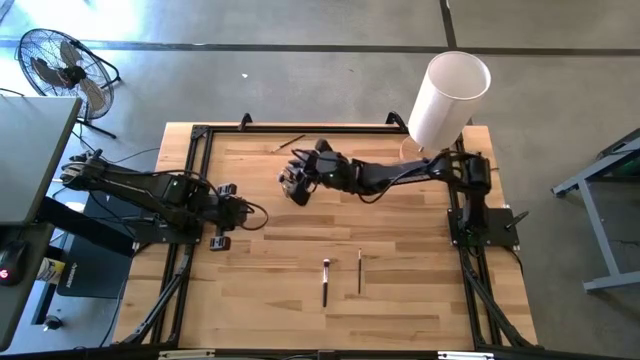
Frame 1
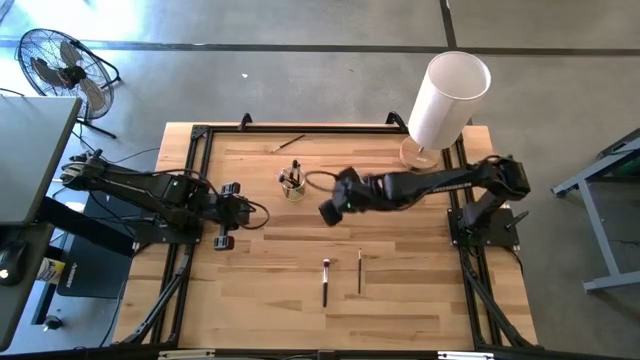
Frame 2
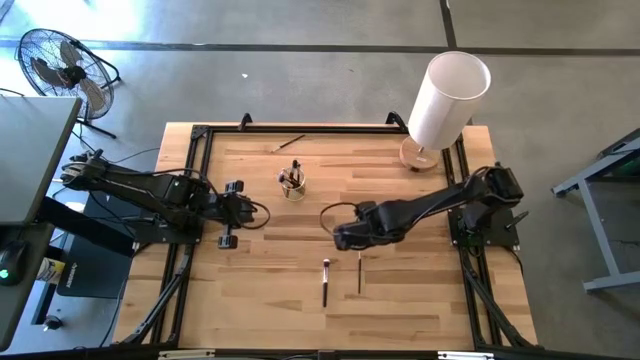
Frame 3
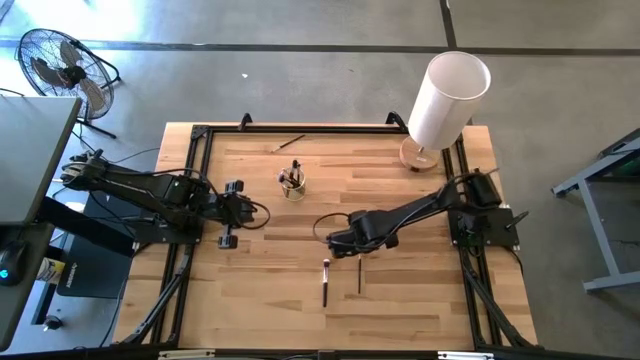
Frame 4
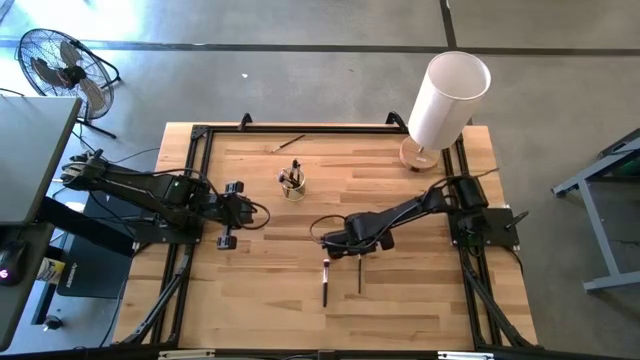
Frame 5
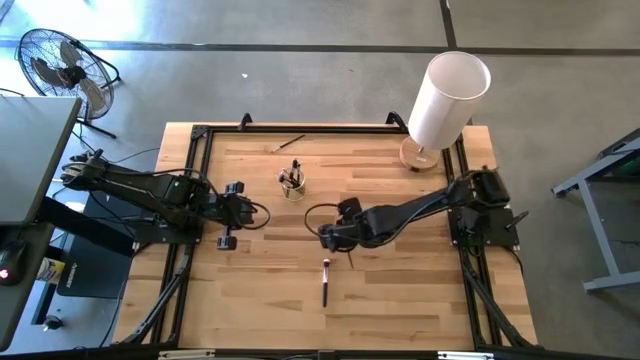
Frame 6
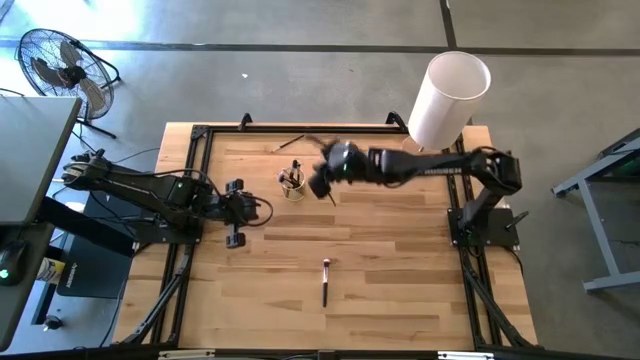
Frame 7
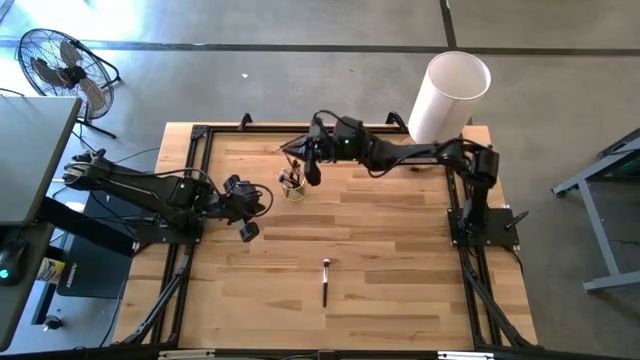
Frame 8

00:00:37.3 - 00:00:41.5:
Task: Put items in baskets/containers
Put the makeup brush into the wire organizer

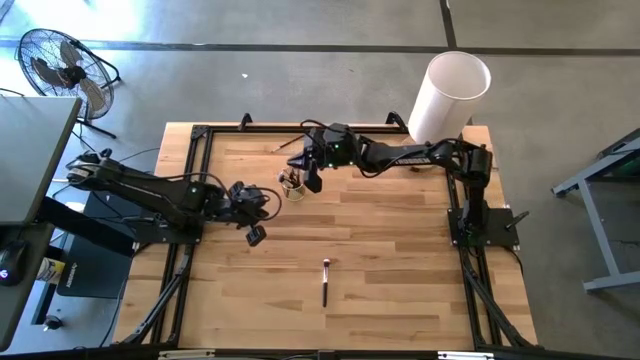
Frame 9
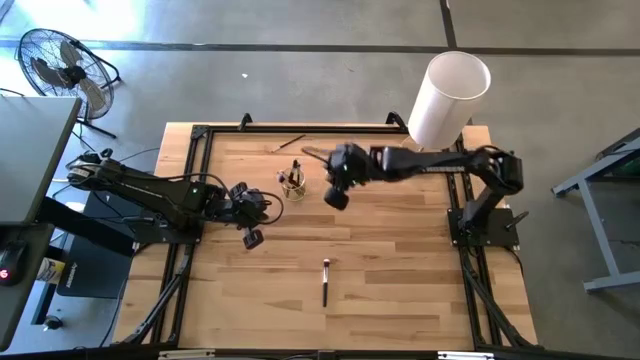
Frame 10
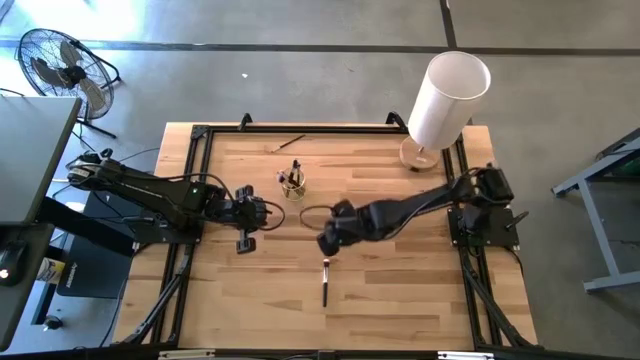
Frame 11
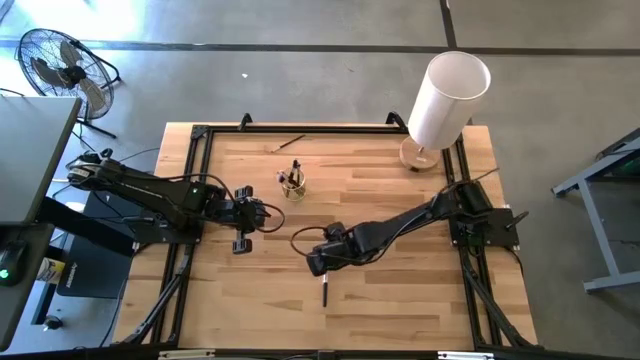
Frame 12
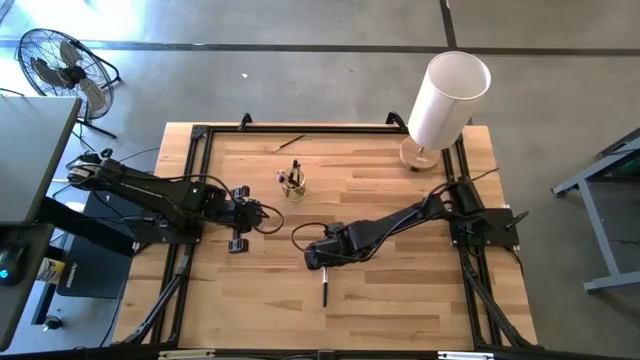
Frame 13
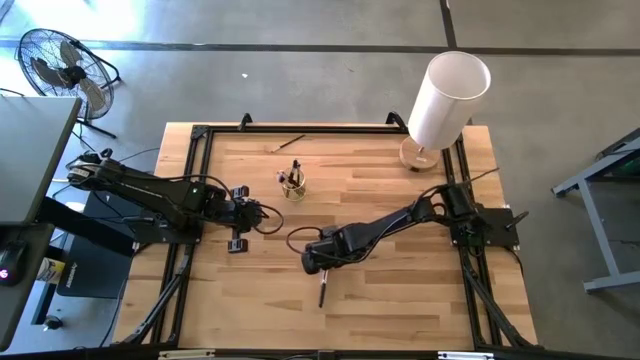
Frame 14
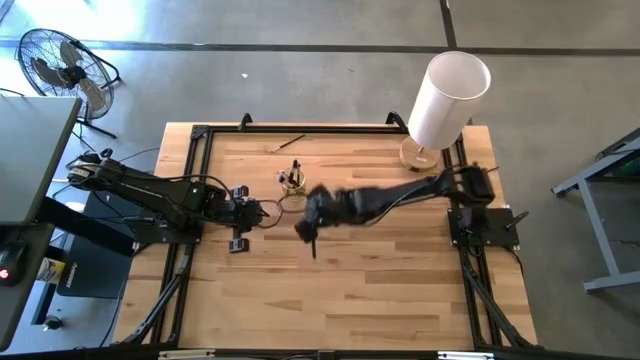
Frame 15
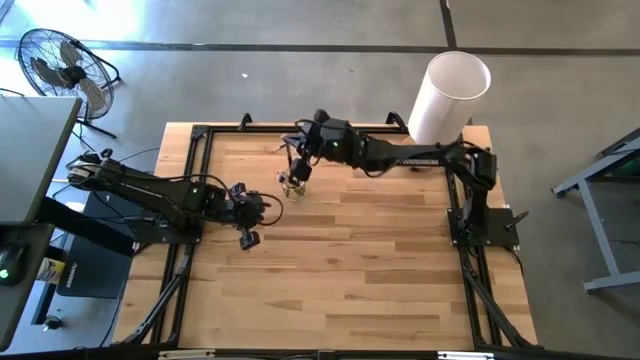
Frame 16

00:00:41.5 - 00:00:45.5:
Put the makeup brush into the wire organizer

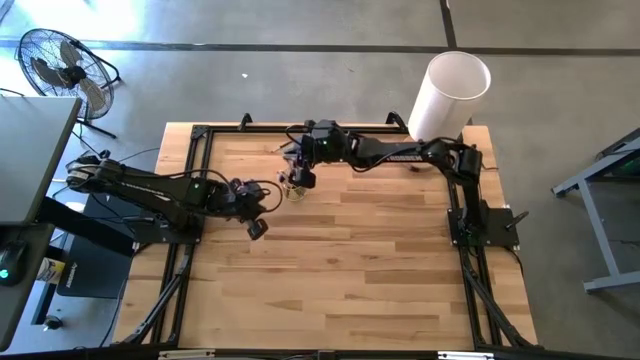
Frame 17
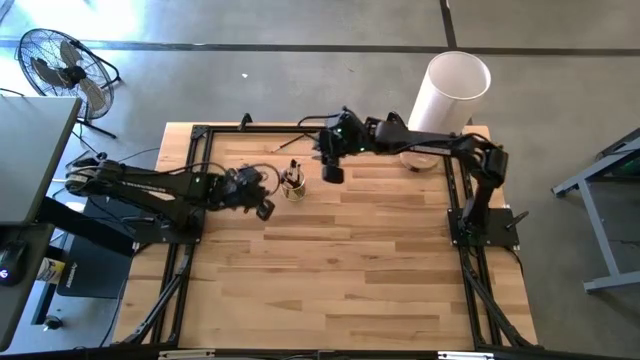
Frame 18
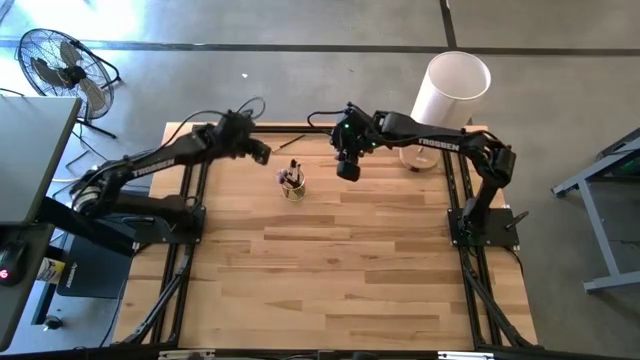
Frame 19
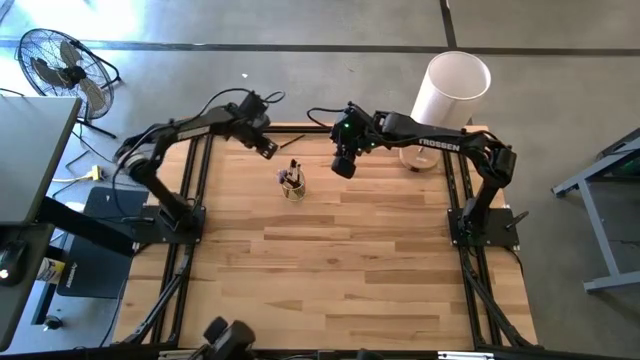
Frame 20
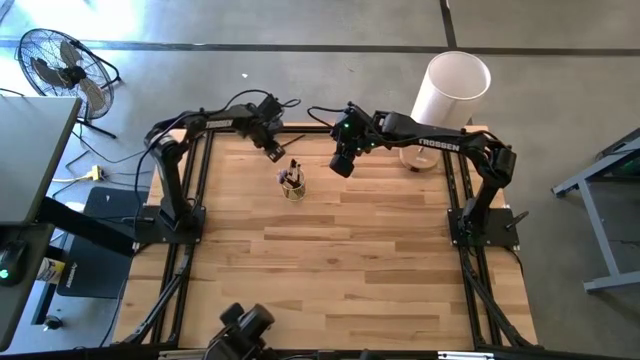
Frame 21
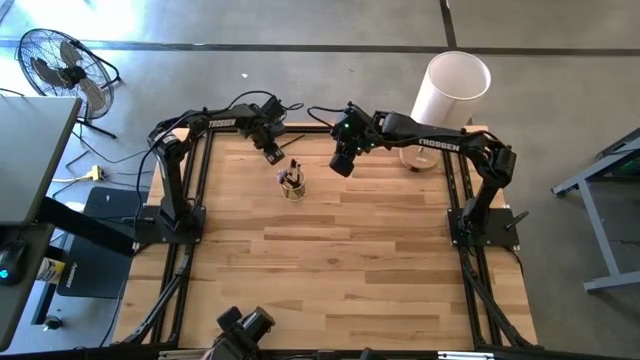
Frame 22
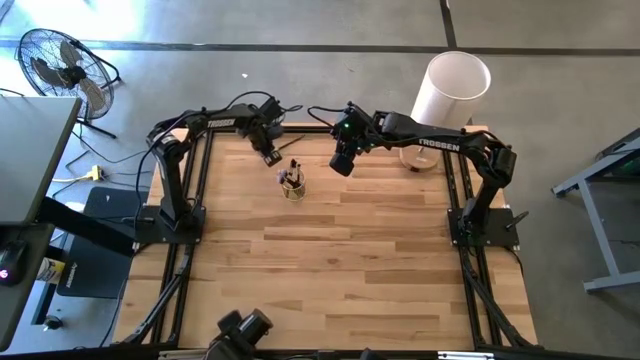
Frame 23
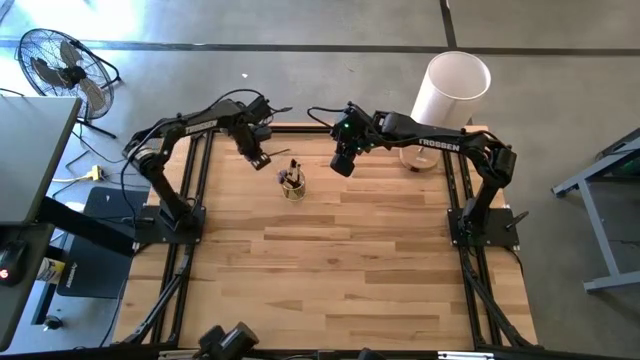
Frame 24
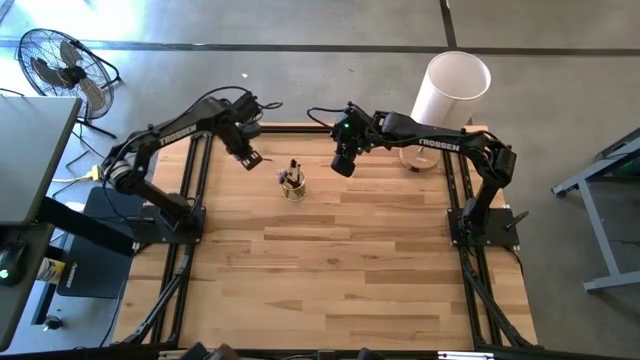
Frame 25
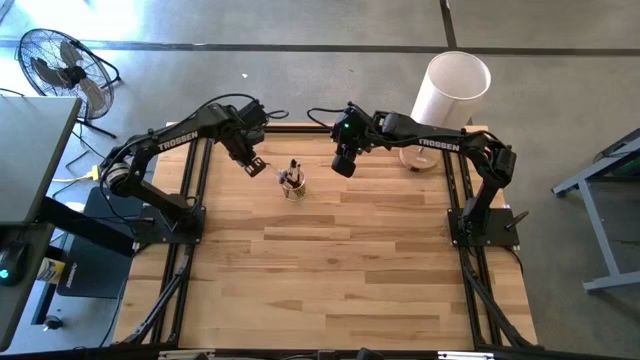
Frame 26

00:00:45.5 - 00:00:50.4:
Put the makeup brush into the wire organizer

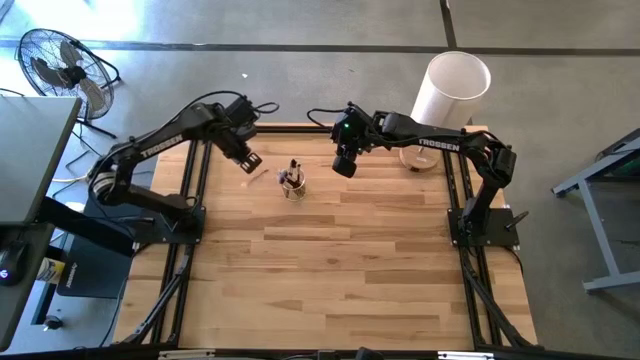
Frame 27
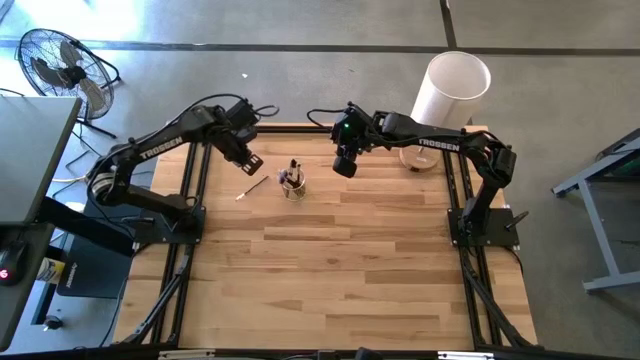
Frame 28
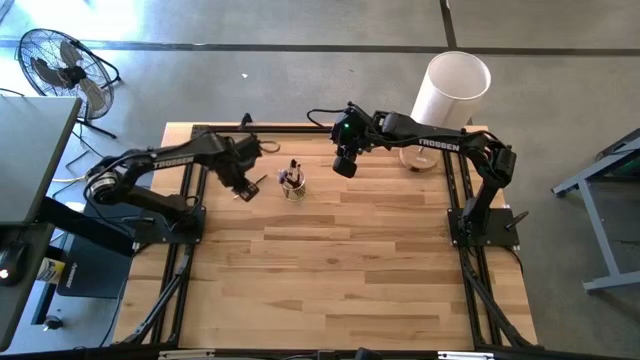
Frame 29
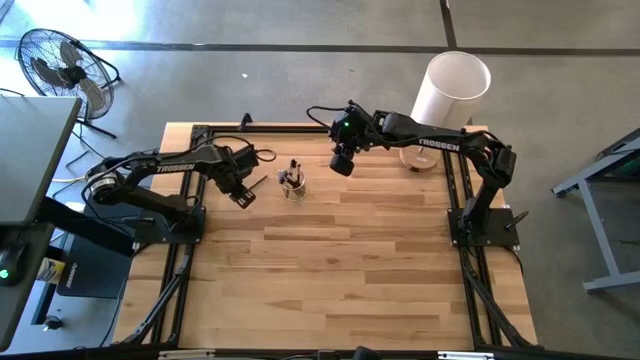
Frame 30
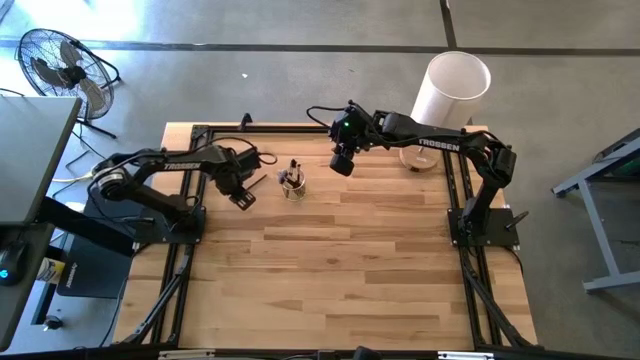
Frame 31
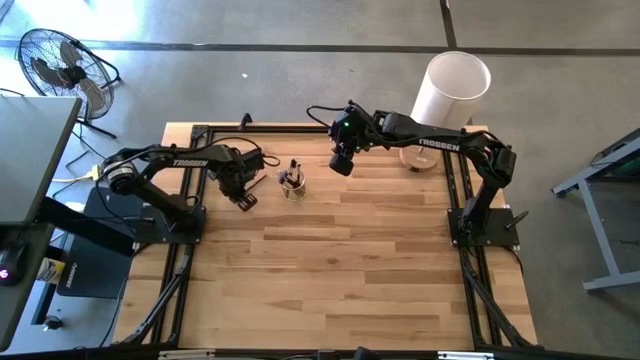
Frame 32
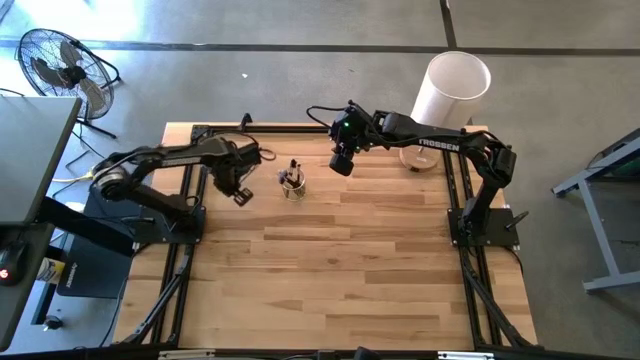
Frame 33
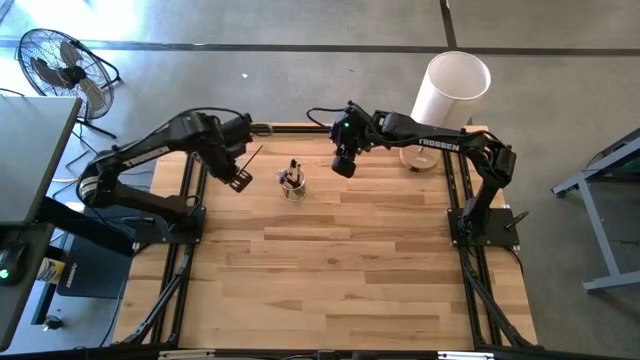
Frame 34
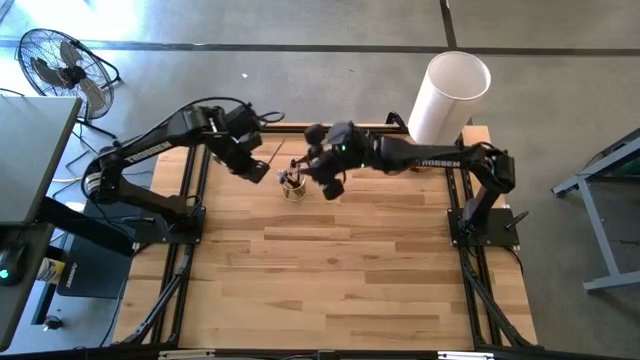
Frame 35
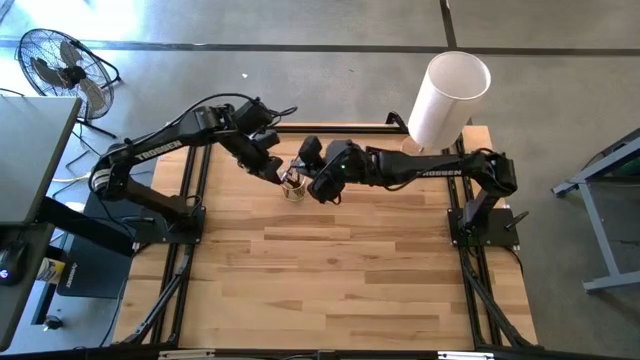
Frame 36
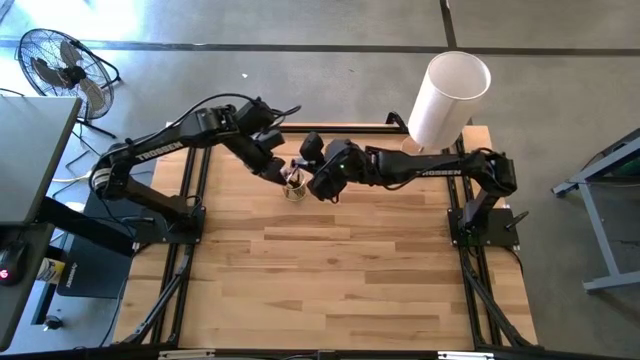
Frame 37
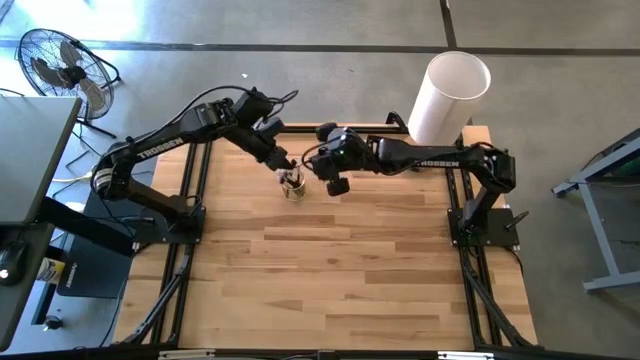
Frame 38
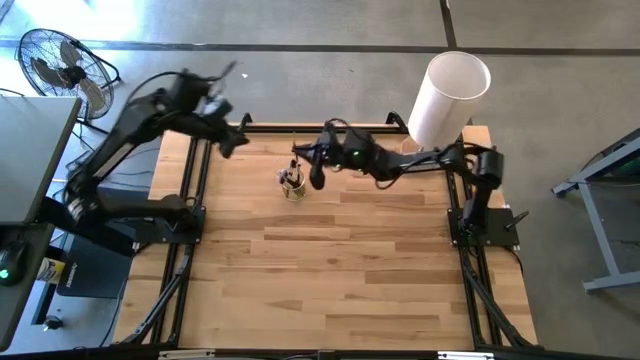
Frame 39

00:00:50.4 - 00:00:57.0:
Put the makeup brush into the wire organizer

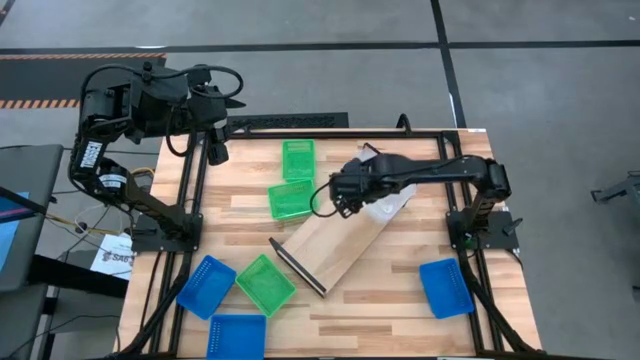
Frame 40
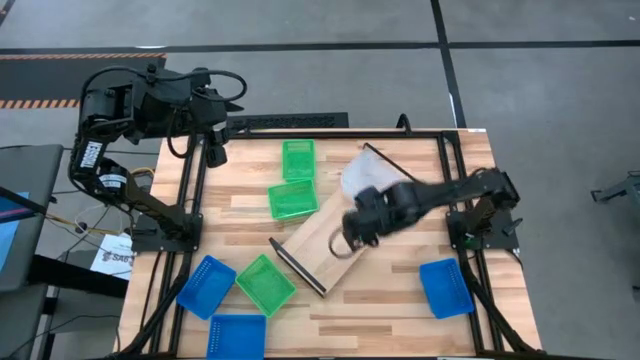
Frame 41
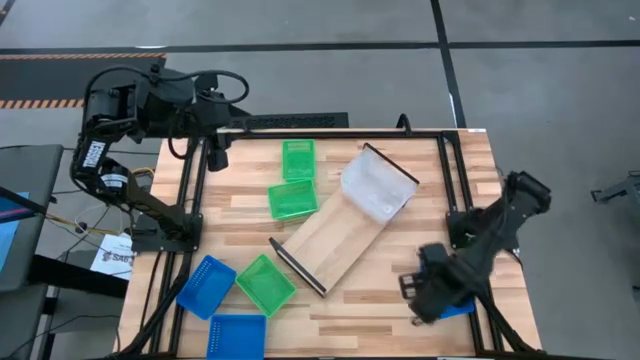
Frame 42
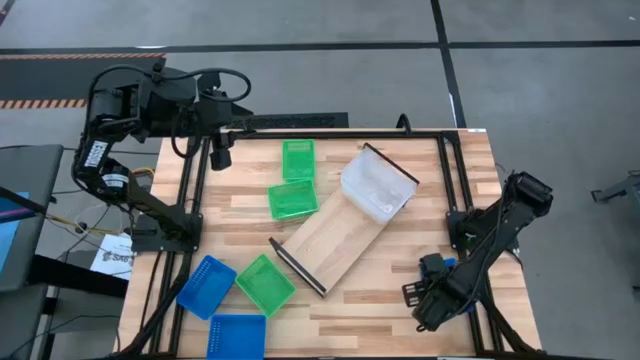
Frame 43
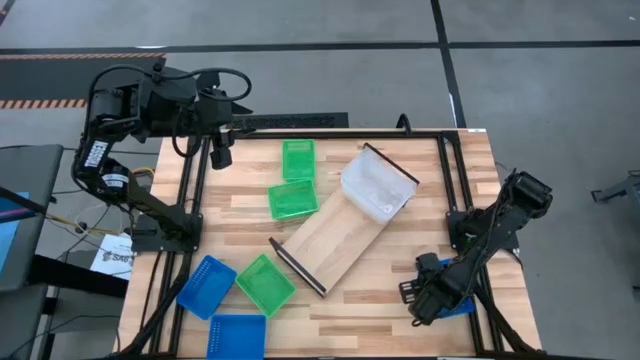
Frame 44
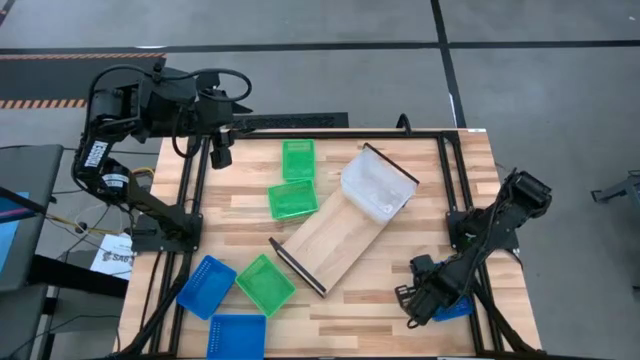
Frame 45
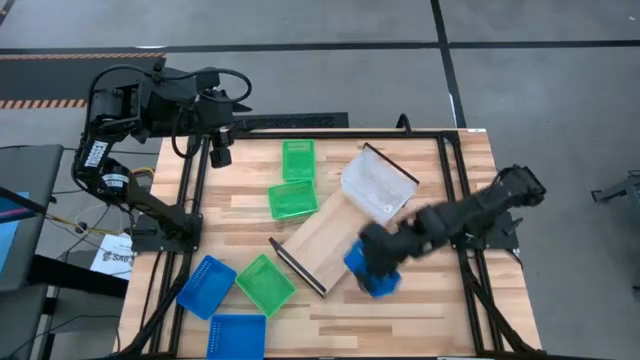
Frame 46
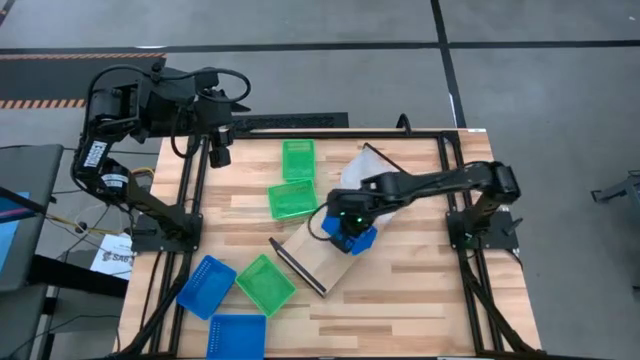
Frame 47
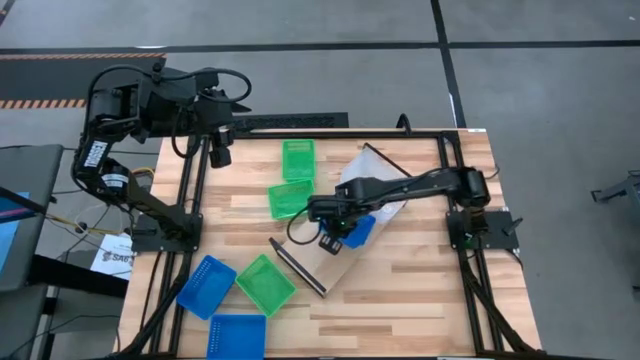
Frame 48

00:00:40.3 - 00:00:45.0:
Task: Stack baskets on shelf by color
Put the right blue bin on the shelf
